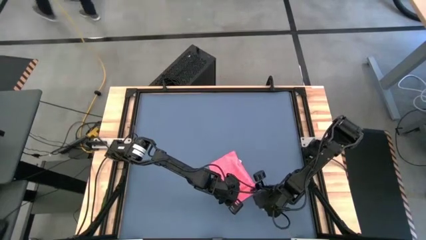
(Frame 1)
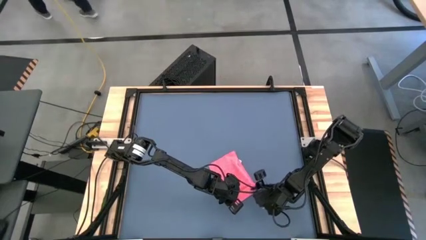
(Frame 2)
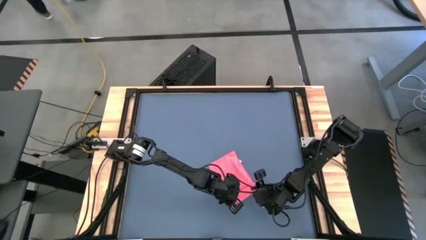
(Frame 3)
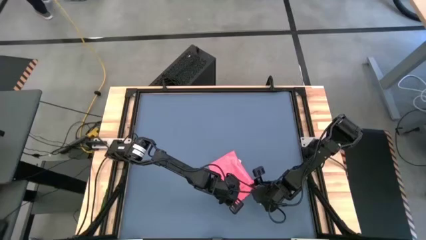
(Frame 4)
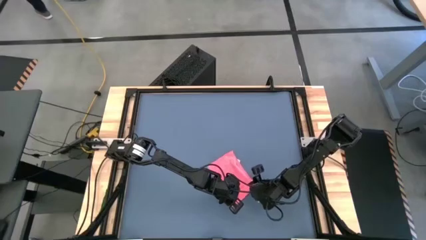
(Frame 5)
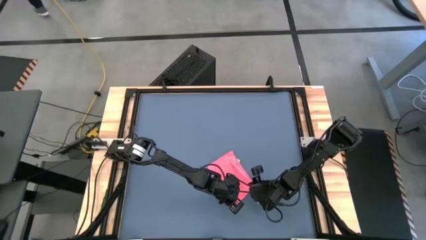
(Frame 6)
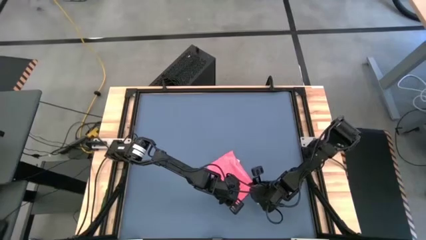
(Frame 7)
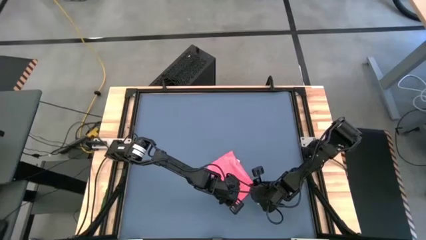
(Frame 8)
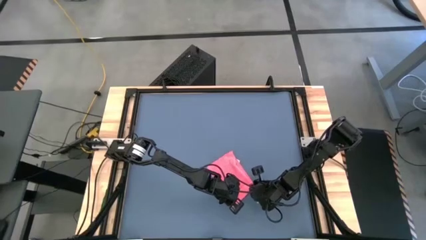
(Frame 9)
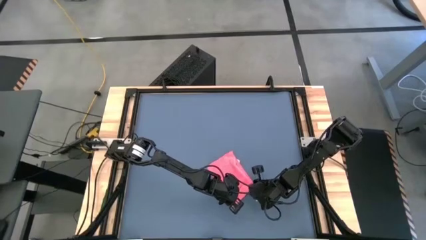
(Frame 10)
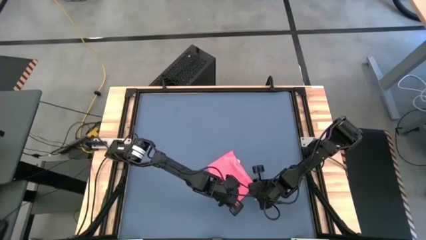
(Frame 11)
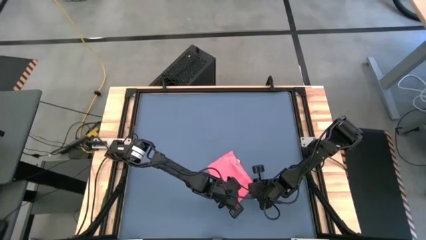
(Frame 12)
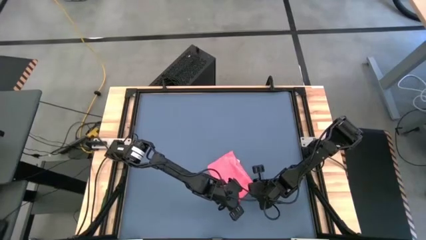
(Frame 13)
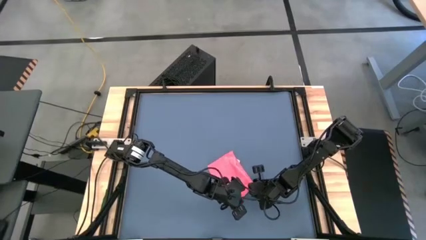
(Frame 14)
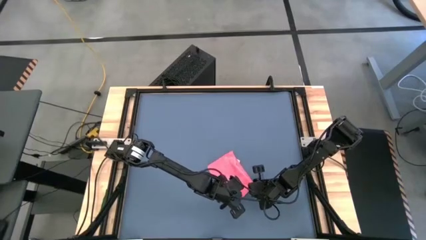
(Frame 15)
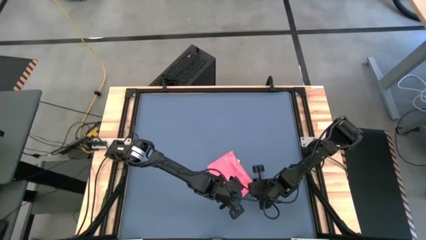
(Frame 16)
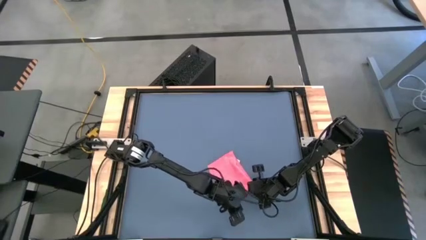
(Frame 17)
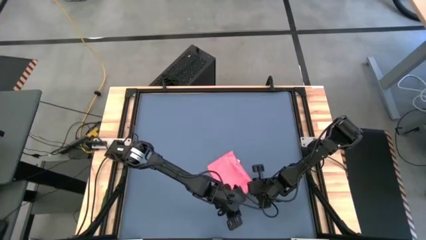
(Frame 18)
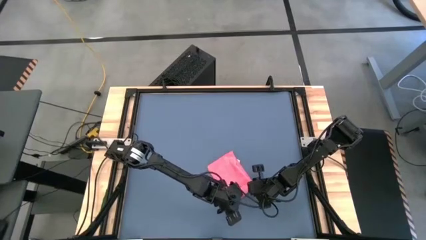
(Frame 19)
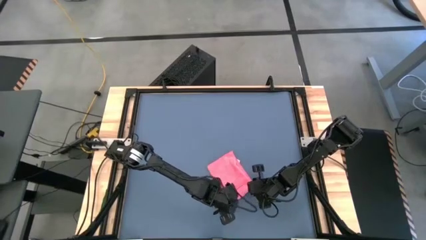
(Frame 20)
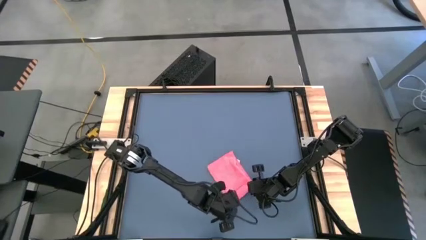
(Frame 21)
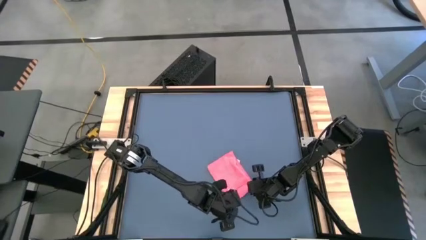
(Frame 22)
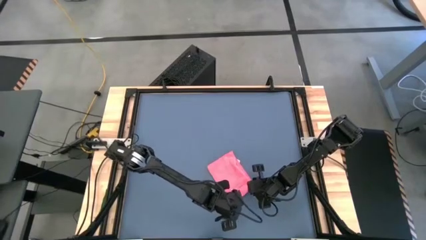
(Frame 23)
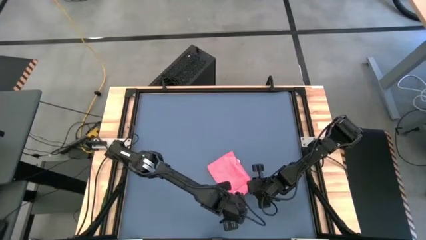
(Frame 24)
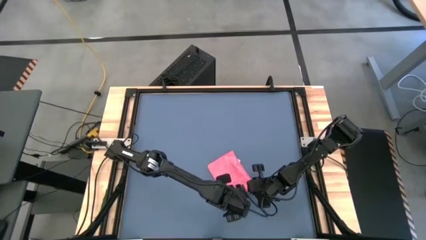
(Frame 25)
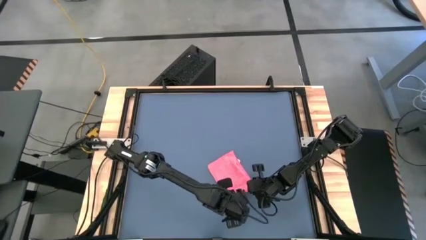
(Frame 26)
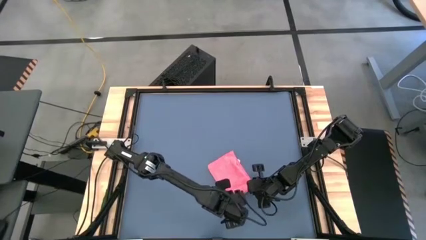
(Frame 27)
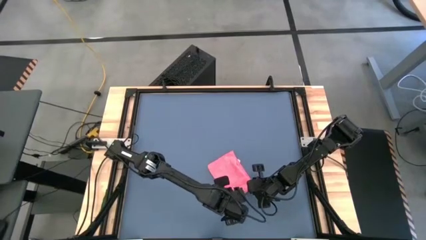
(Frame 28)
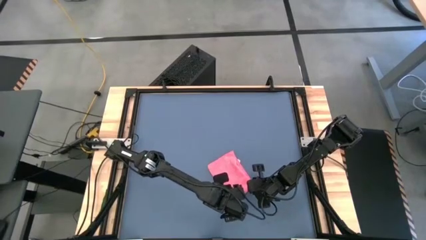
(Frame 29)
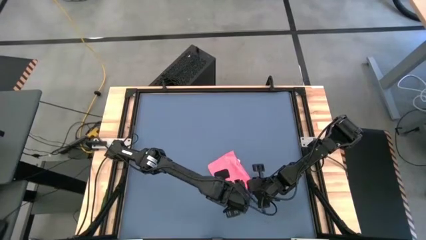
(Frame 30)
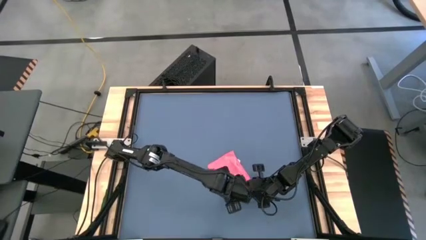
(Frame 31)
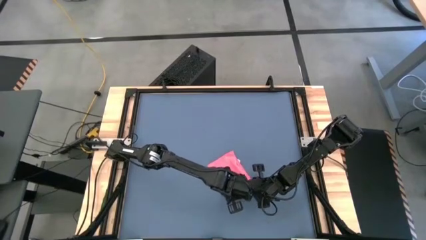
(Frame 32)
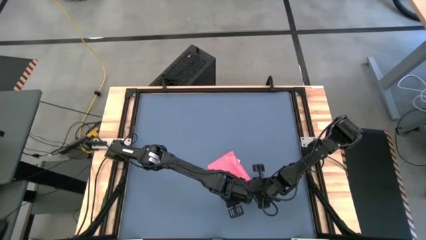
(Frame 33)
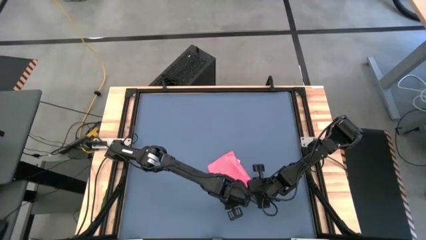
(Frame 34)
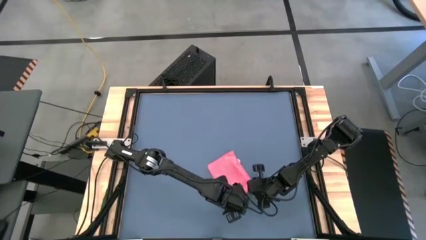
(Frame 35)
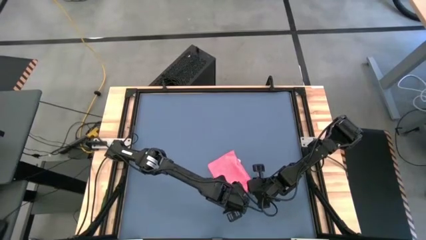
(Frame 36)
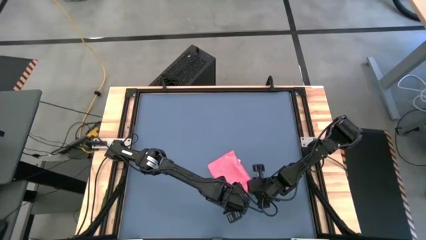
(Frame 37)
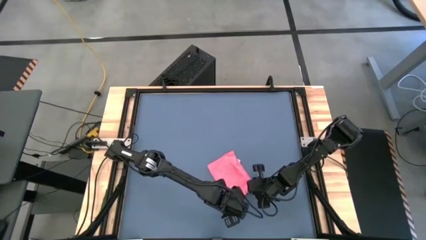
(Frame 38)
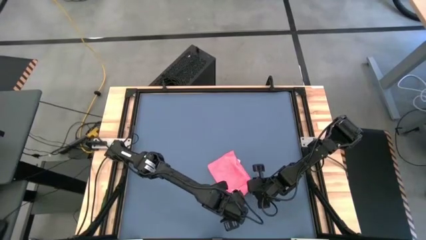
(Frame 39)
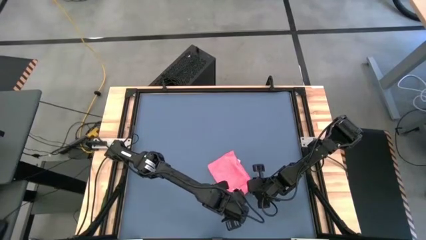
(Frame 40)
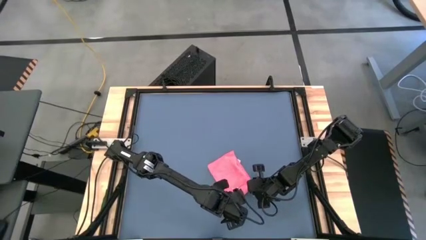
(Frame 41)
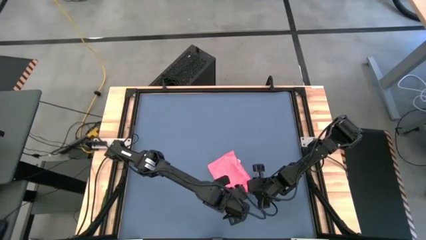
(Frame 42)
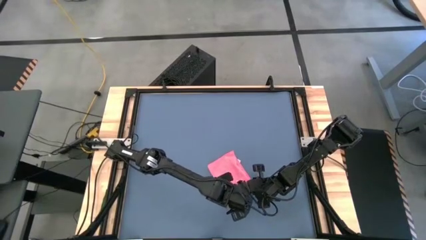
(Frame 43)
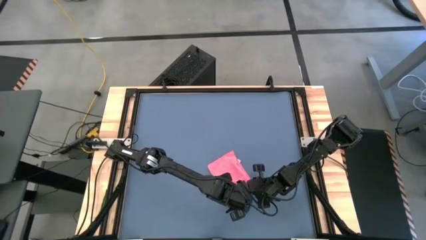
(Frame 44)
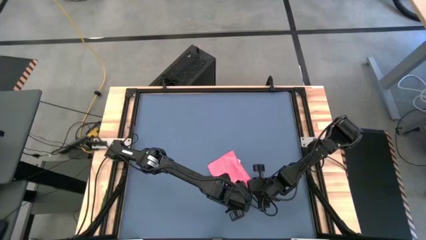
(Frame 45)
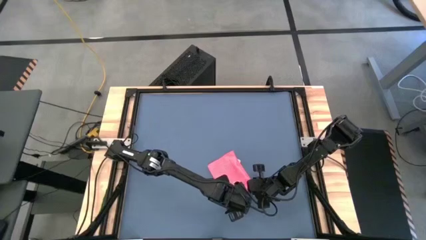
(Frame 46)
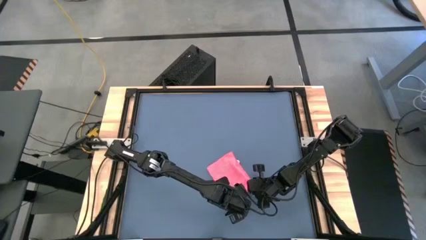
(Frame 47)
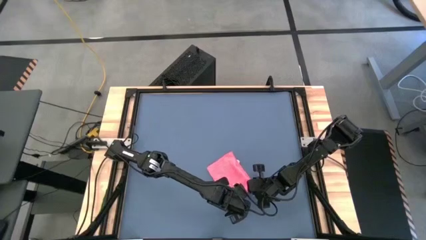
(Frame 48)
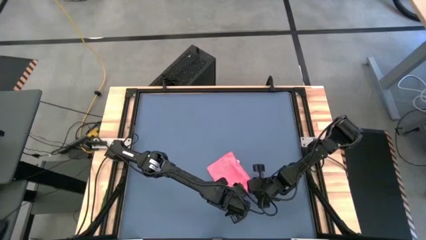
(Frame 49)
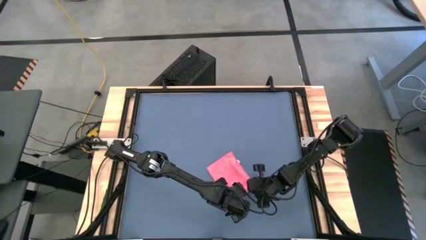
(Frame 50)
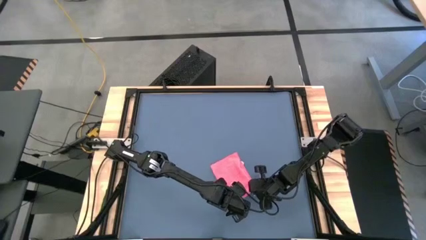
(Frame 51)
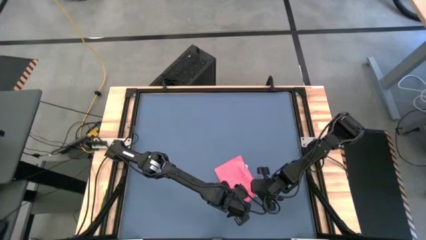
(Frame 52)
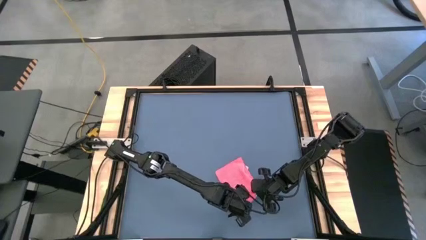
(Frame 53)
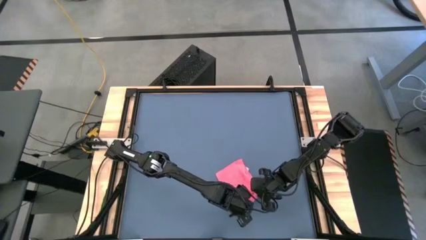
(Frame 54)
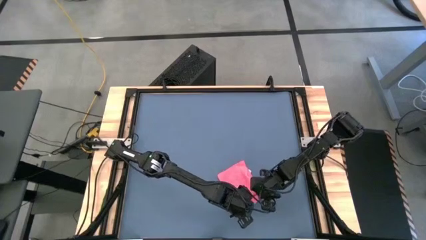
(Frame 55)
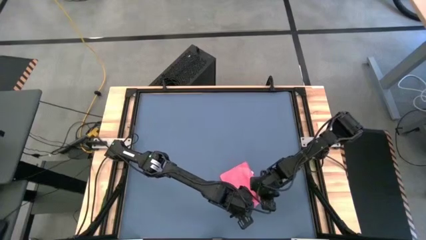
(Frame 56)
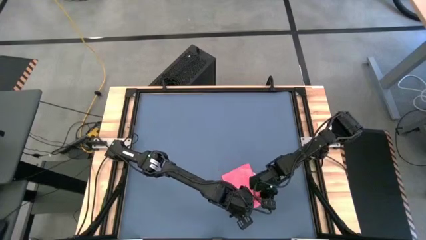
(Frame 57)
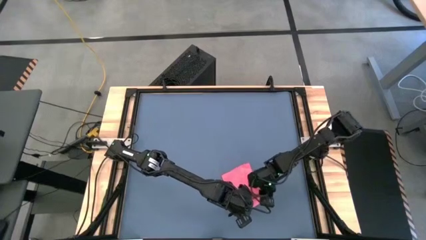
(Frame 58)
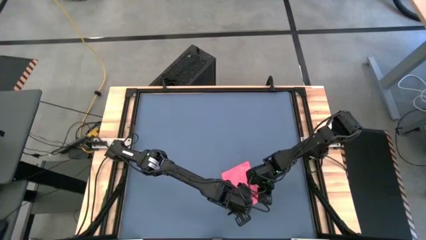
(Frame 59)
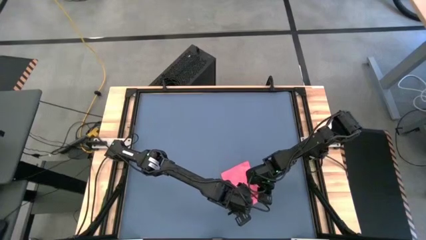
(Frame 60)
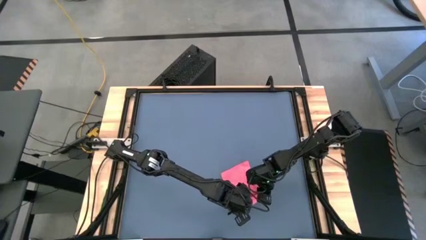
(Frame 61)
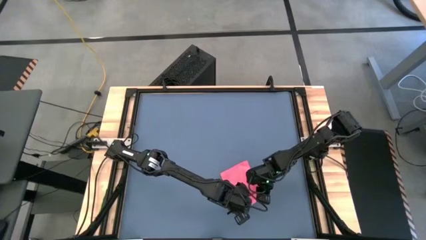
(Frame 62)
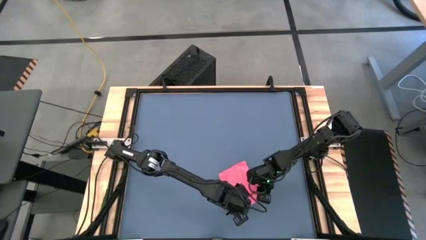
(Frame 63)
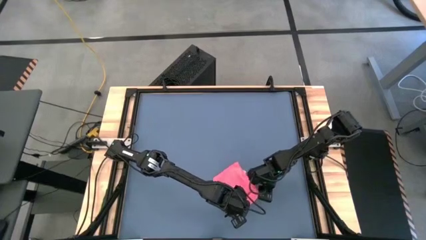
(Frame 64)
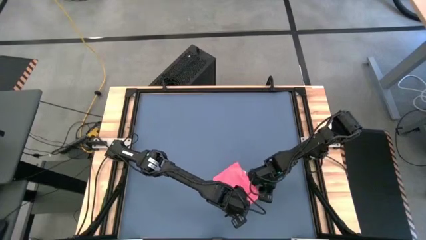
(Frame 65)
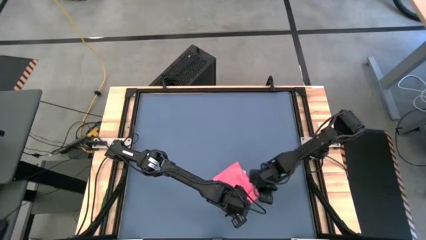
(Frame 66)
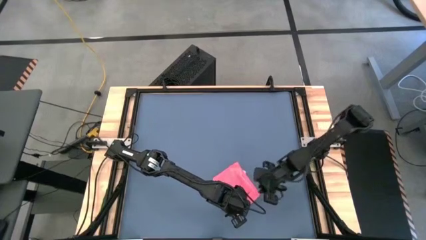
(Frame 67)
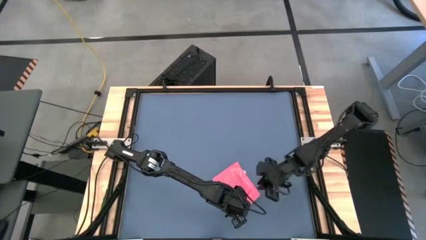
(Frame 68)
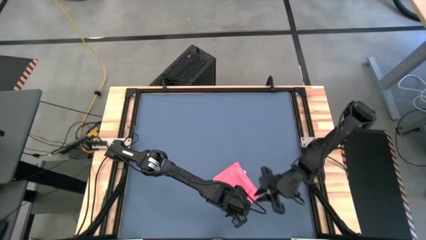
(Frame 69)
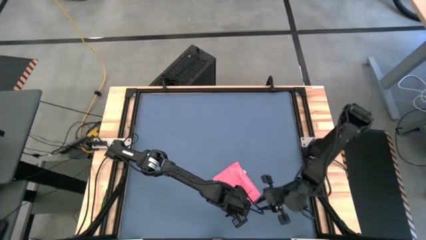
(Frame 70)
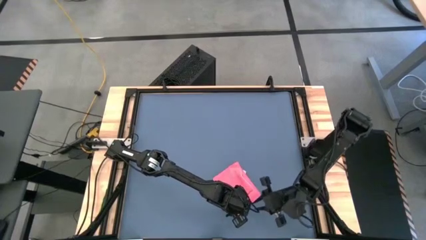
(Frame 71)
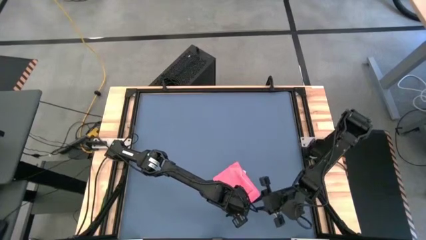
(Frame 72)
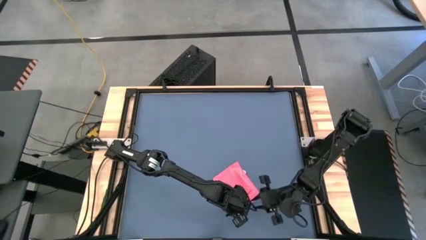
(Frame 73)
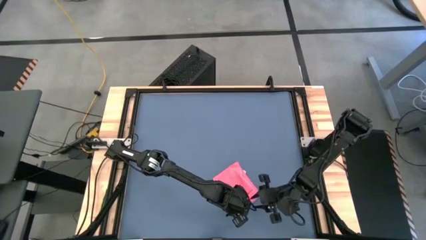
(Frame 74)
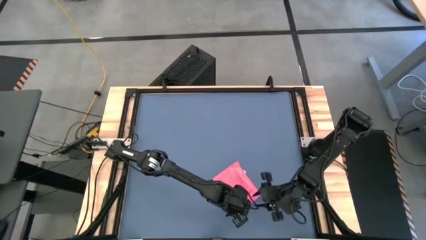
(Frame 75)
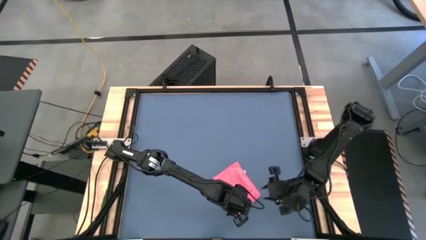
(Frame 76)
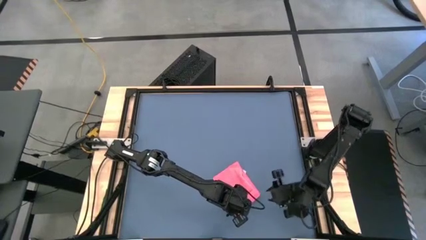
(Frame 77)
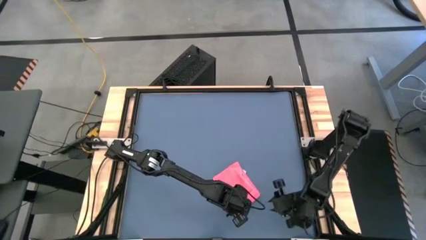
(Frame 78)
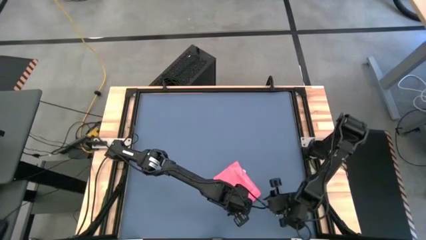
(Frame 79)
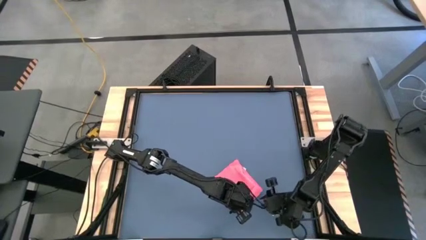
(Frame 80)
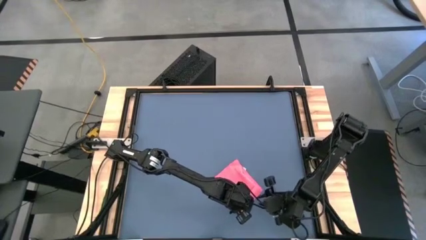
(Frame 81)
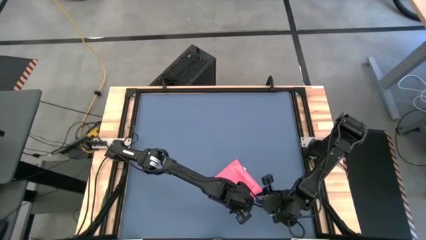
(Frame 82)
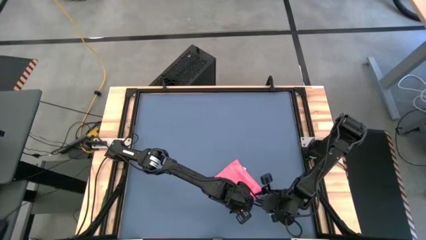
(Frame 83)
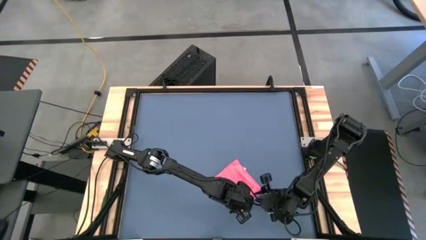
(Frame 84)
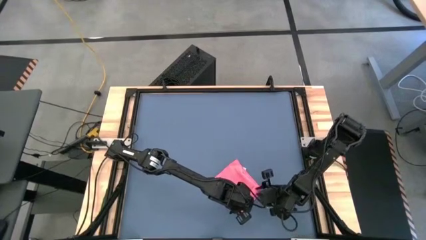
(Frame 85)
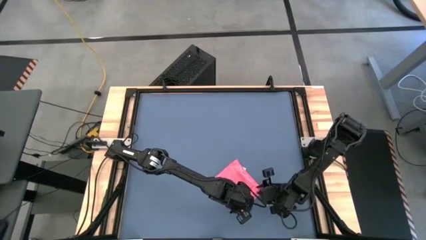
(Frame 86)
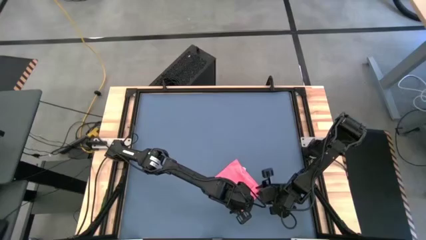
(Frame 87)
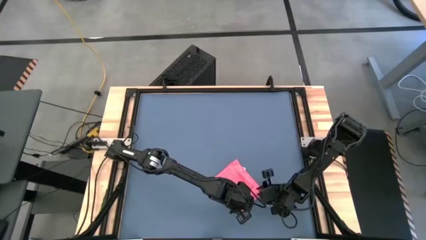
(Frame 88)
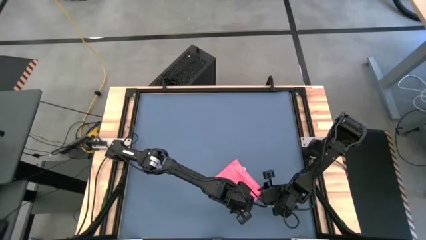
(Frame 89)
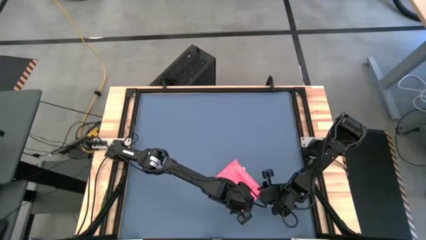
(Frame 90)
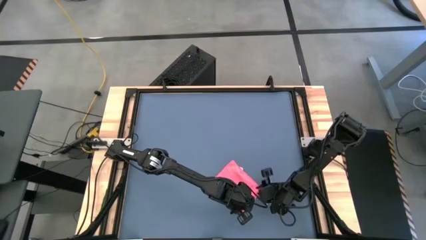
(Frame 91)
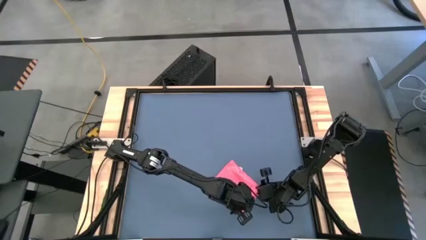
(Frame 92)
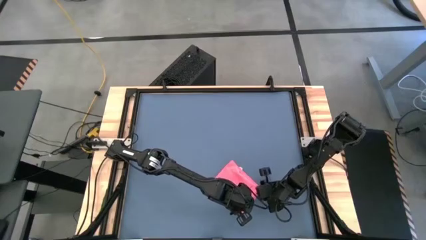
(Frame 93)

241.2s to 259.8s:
Task: Roll towel
Roll the pink towel
